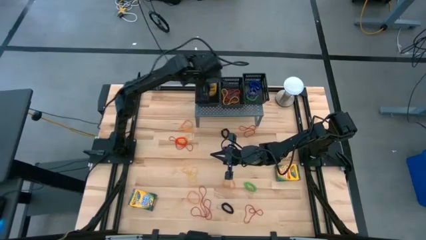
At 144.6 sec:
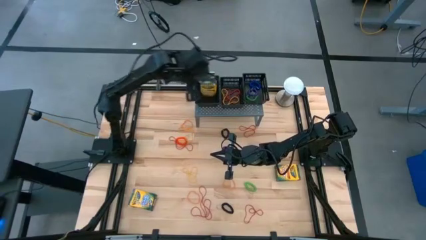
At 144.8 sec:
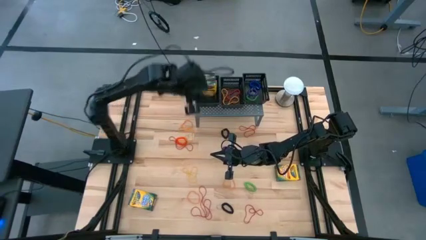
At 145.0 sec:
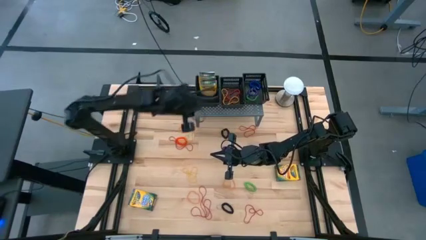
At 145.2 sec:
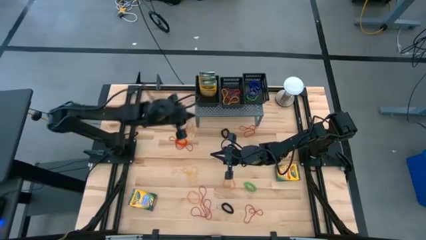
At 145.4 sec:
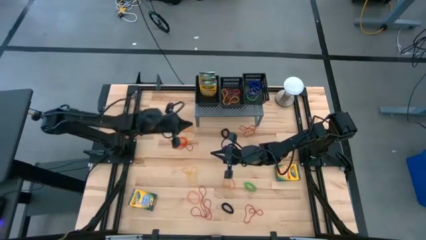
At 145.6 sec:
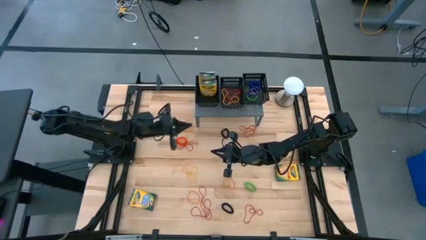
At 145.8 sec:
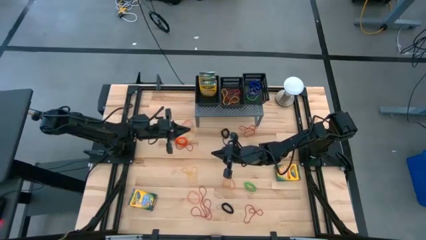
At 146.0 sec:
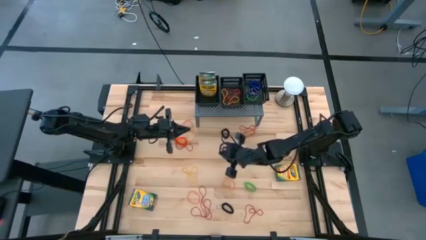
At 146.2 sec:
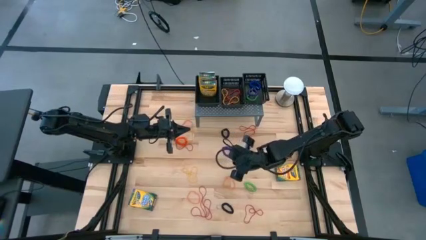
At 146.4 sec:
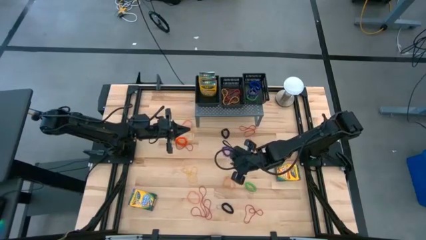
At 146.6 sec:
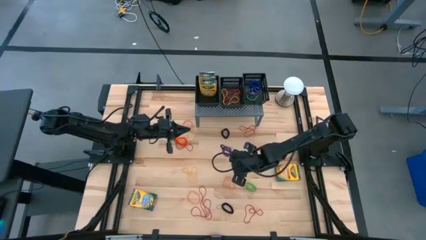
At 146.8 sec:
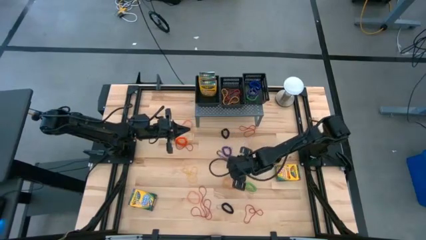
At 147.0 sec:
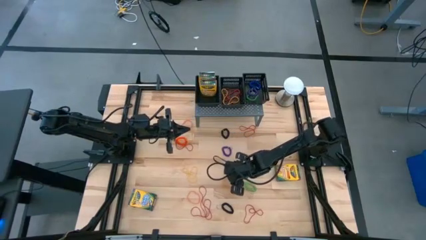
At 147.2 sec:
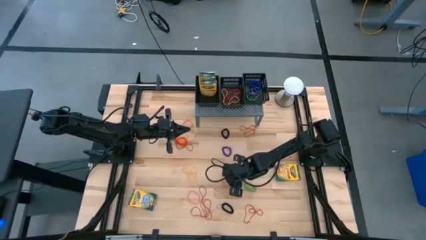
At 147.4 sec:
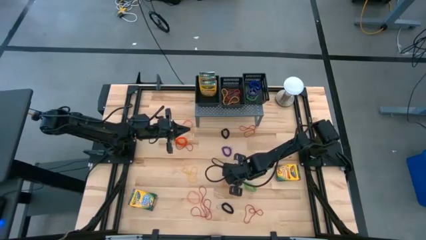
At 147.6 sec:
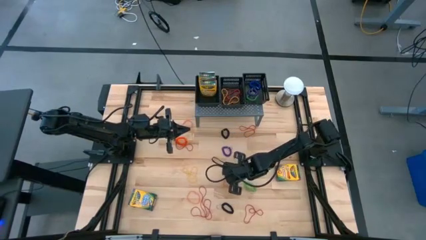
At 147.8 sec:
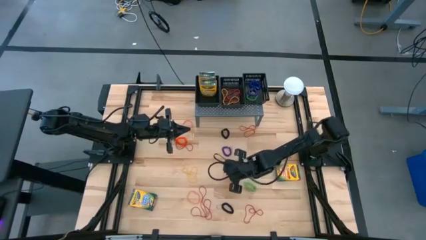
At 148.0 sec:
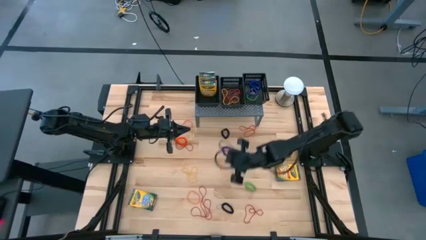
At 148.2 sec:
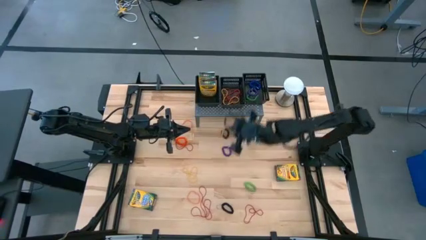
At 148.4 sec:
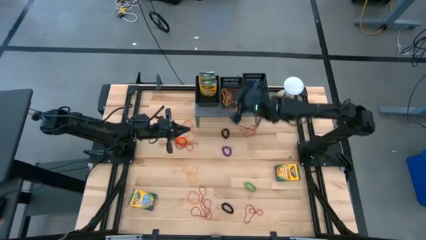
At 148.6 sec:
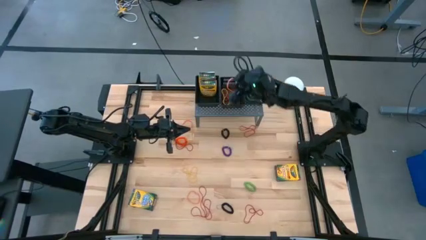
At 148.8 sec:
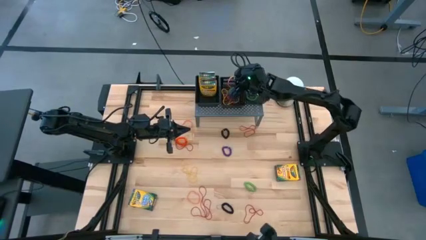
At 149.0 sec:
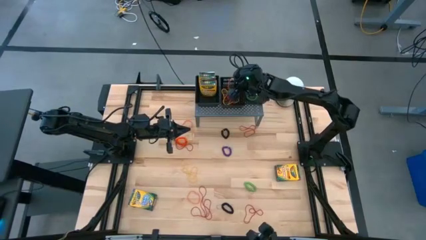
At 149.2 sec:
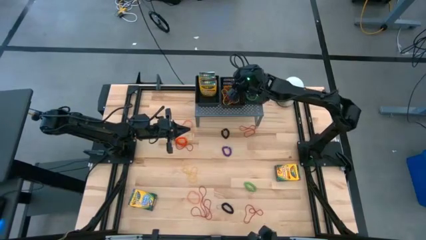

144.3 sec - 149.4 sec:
Task: Sort rubber bands into baskets
Put the orange rubber band into the middle black basket on the shelf

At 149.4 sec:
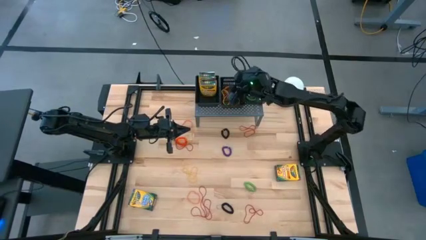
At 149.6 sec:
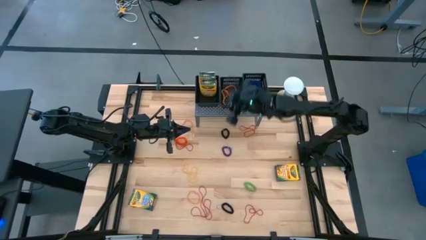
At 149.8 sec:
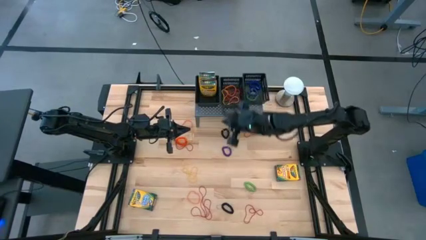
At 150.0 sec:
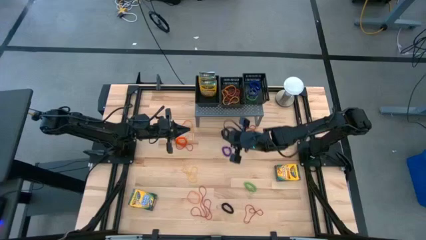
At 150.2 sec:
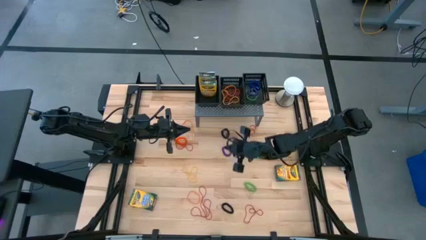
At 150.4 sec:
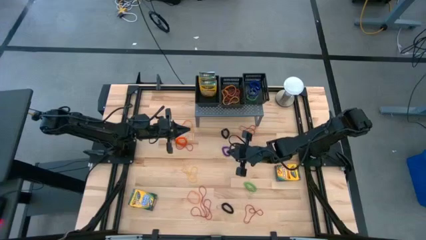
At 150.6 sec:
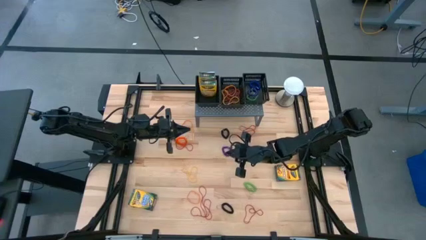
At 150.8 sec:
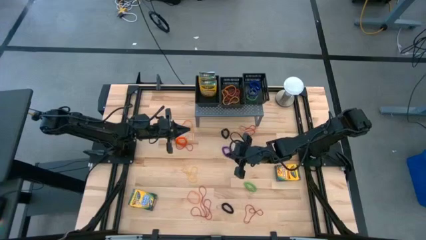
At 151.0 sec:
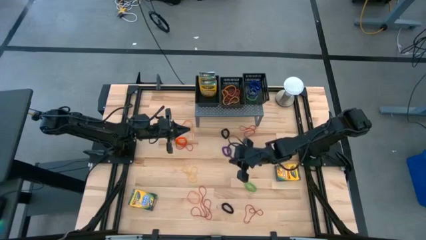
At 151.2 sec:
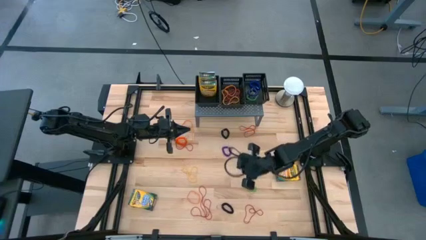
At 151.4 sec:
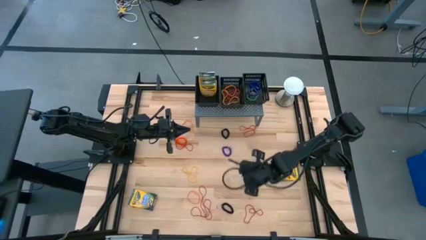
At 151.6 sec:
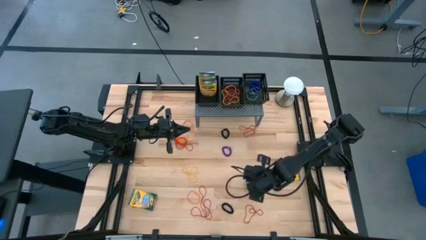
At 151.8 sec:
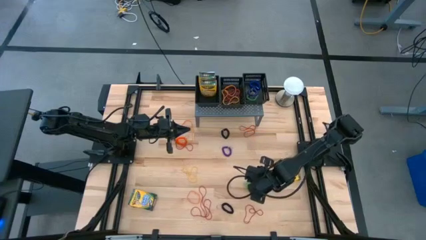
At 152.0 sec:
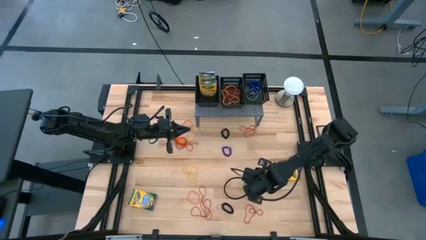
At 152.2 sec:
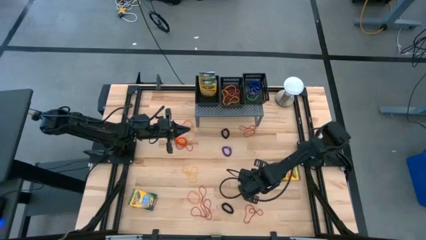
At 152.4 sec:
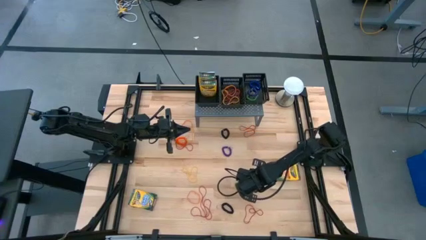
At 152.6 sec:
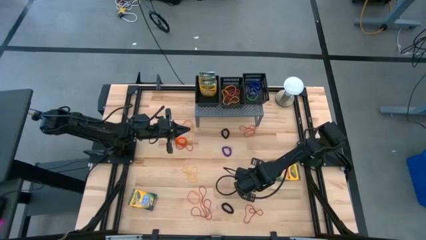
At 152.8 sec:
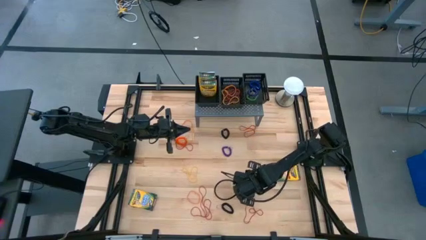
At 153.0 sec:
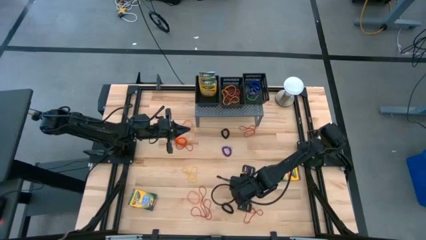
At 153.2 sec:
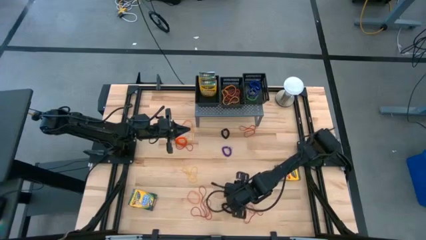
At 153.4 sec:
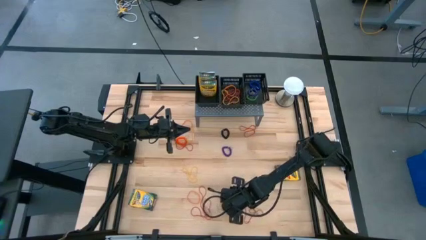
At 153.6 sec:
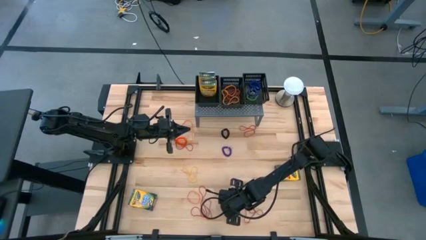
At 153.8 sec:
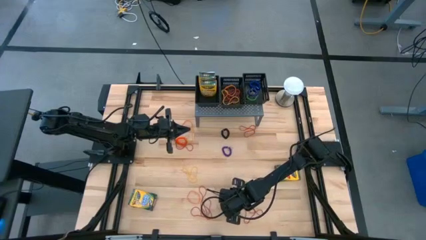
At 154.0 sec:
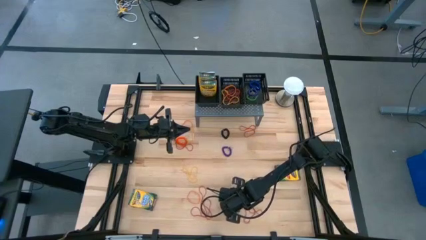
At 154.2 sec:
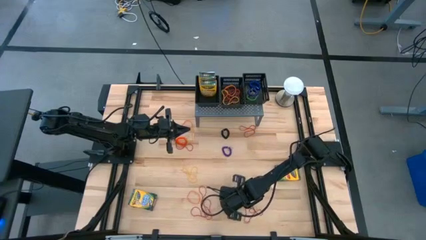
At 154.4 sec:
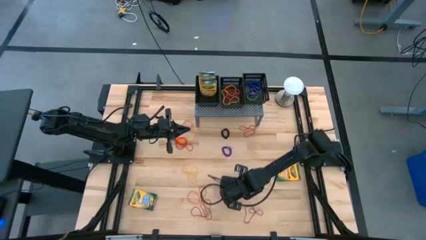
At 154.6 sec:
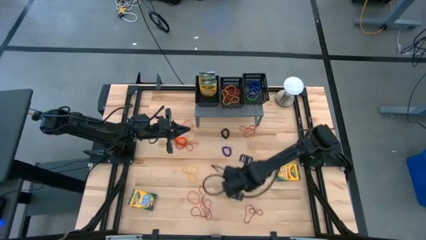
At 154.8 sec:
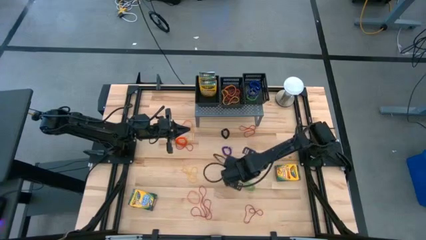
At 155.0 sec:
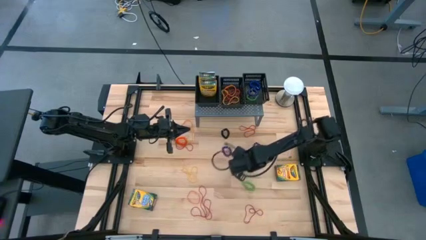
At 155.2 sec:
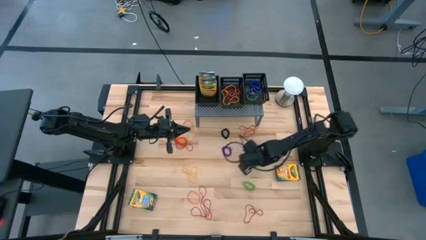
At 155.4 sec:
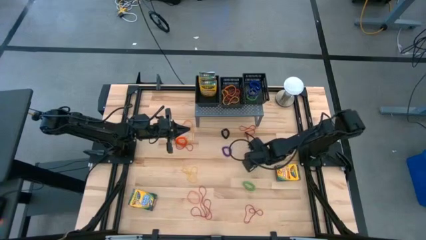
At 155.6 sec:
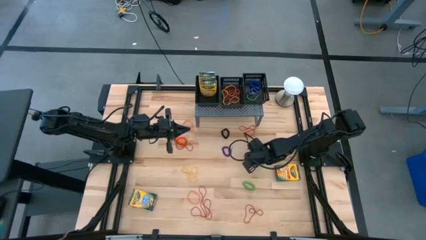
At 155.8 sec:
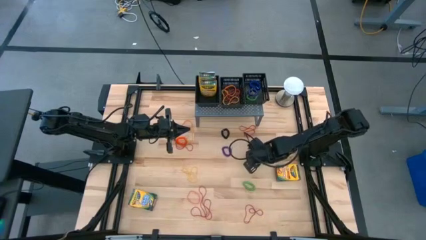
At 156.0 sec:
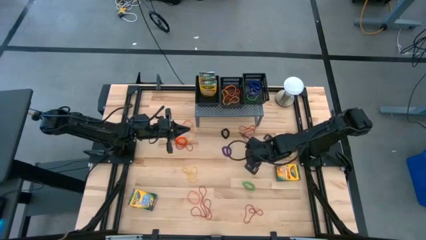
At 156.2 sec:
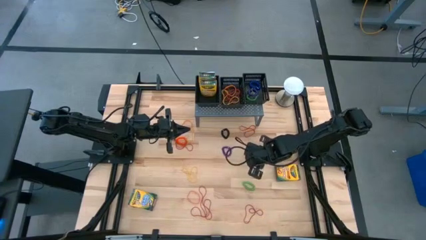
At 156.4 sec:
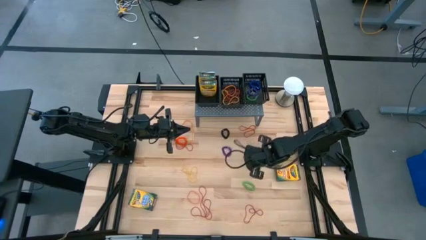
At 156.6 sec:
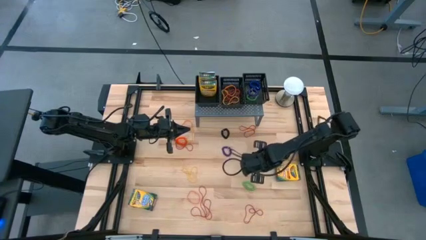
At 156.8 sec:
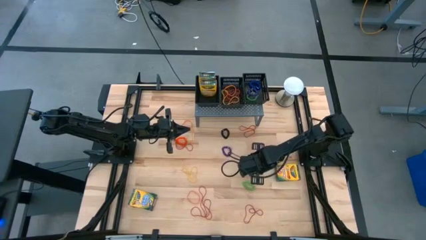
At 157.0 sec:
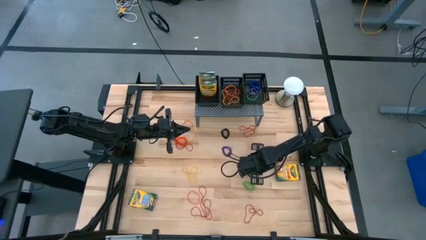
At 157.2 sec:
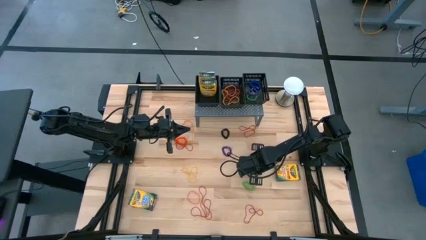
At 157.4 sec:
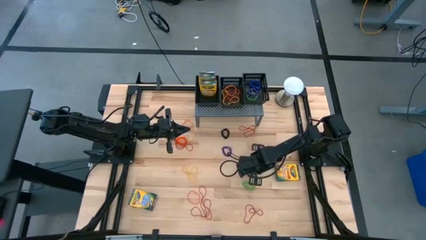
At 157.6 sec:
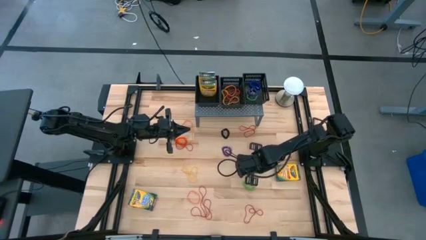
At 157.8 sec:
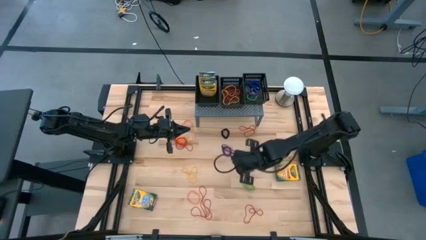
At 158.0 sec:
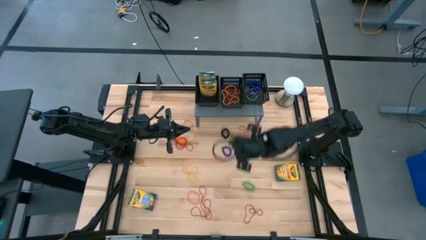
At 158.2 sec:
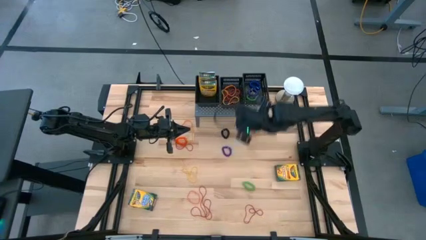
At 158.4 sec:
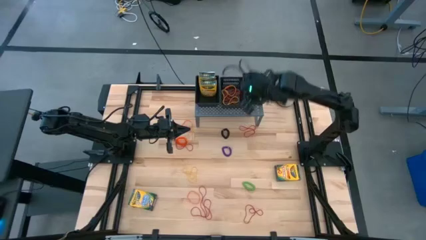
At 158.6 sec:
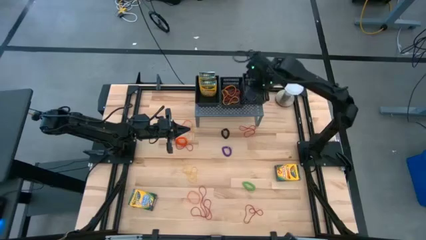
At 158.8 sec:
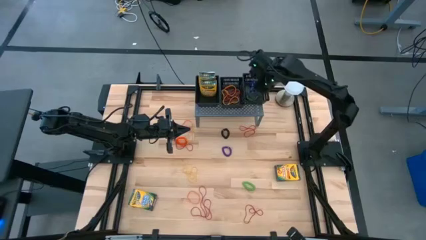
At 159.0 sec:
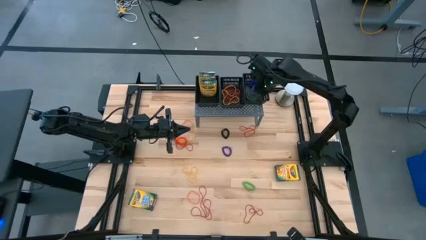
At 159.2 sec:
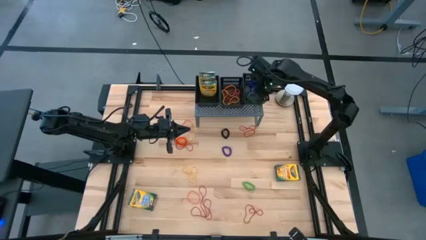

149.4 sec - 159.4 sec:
Put the black spring rubberband into the right black basket on the shelf
